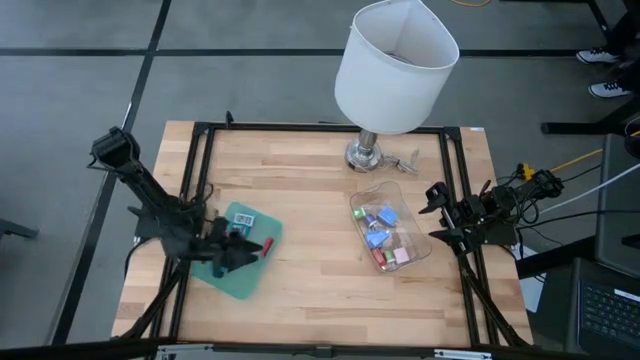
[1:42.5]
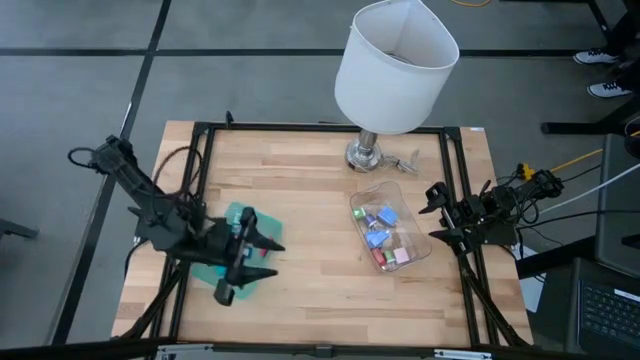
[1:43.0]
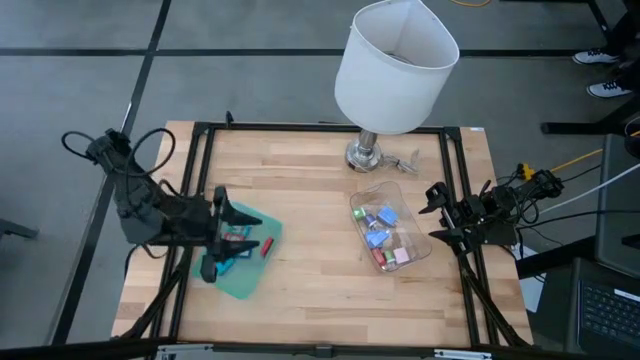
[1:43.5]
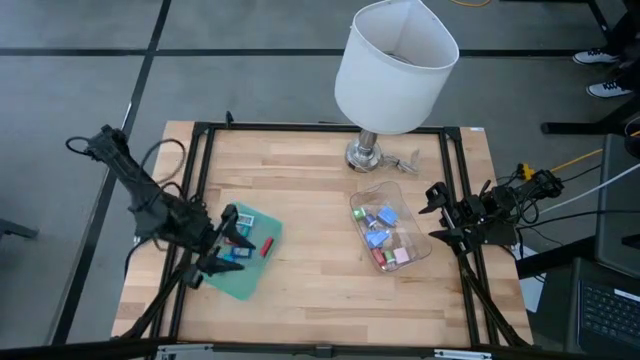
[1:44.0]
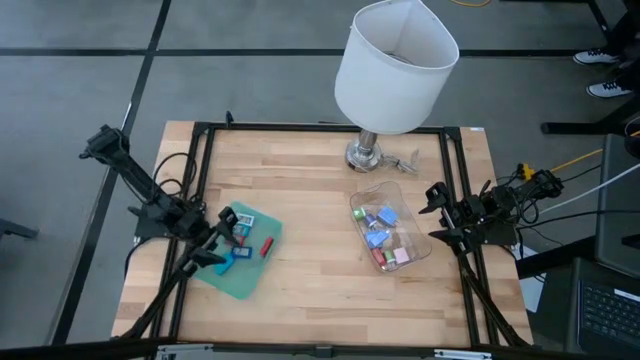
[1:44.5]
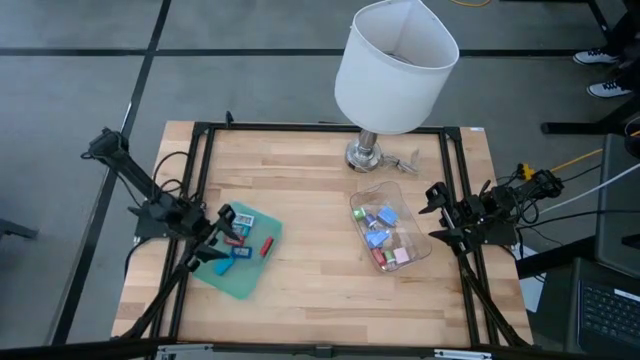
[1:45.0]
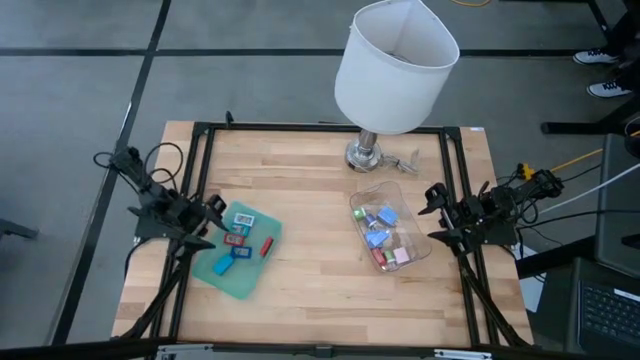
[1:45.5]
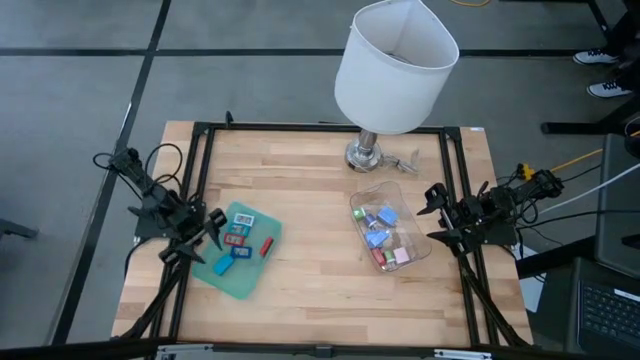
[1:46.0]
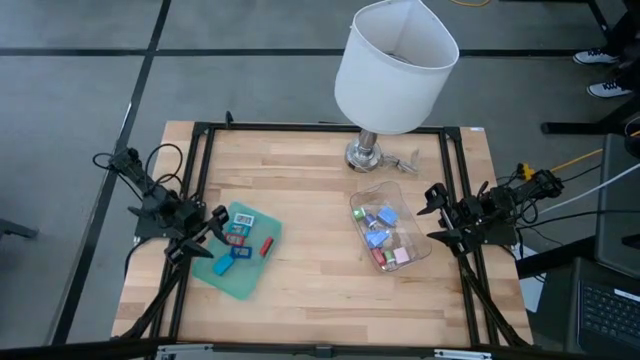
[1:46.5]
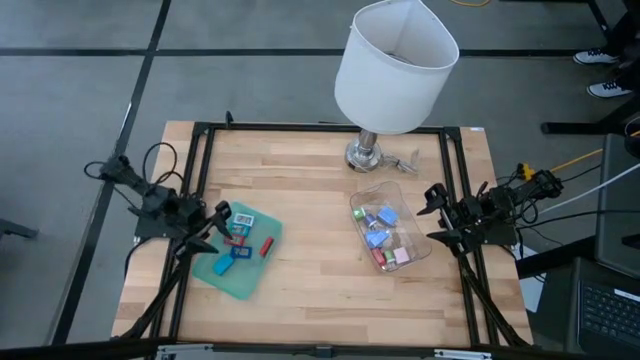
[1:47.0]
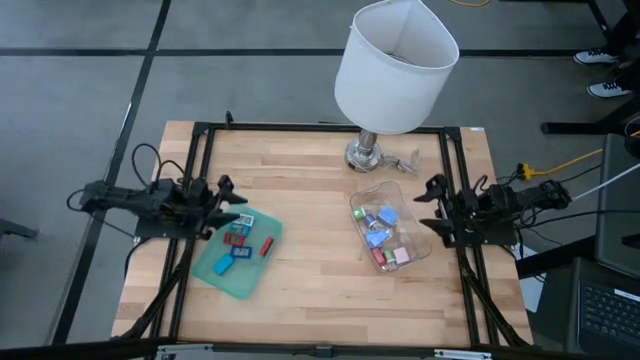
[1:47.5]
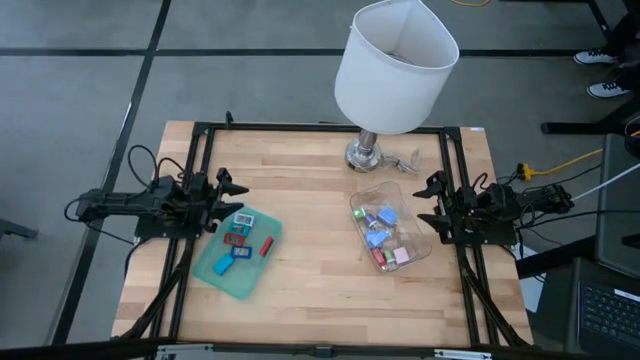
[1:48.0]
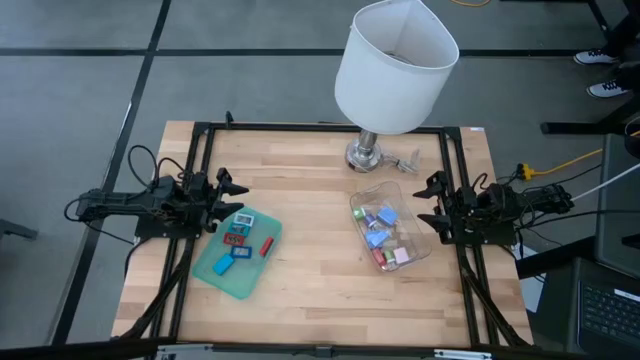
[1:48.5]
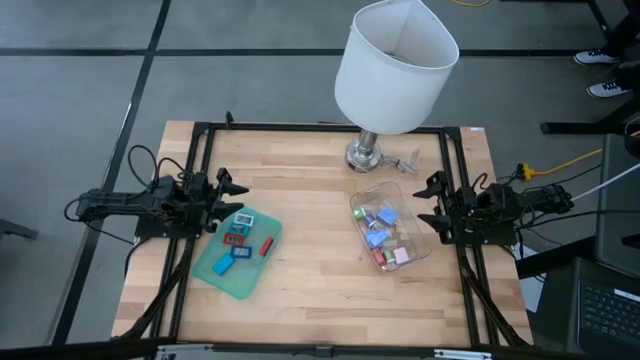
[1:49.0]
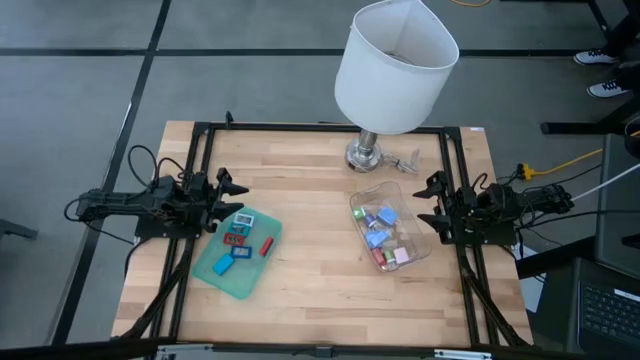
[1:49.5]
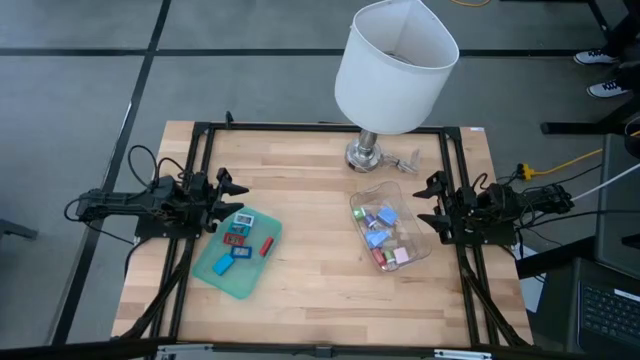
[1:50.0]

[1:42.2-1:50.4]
Task: Pick & Place Office items
Return to Home Position

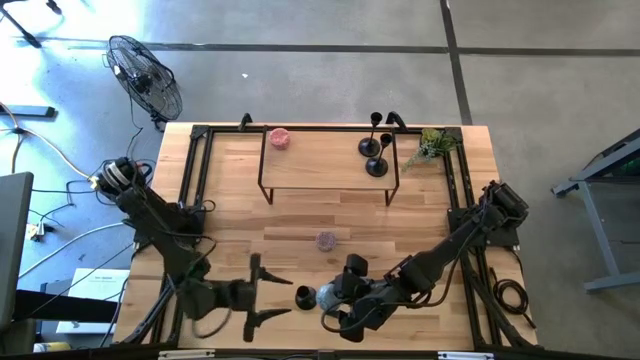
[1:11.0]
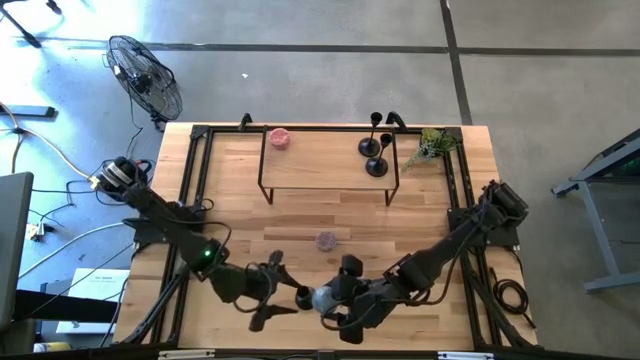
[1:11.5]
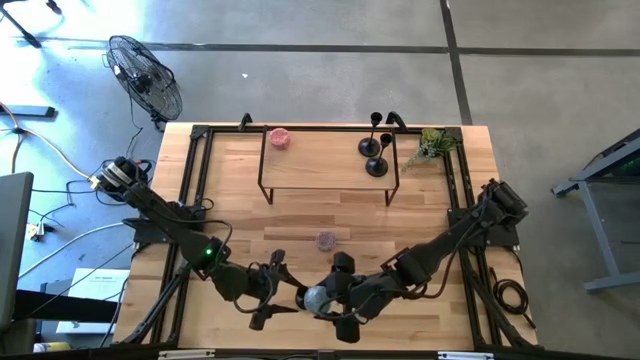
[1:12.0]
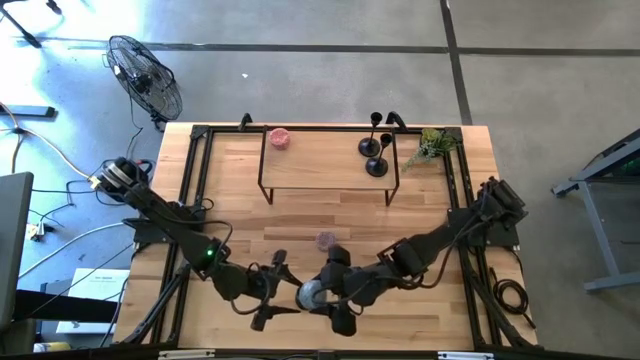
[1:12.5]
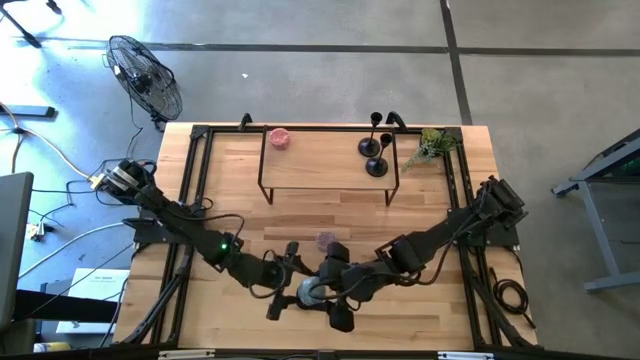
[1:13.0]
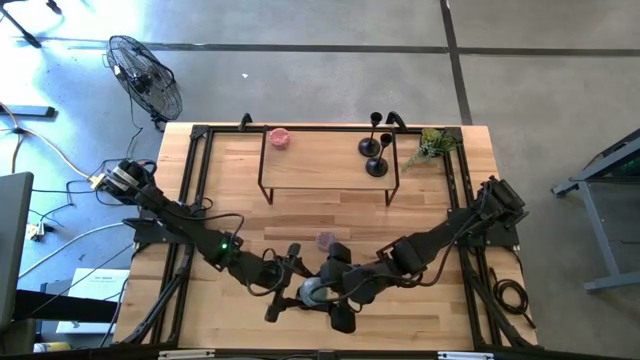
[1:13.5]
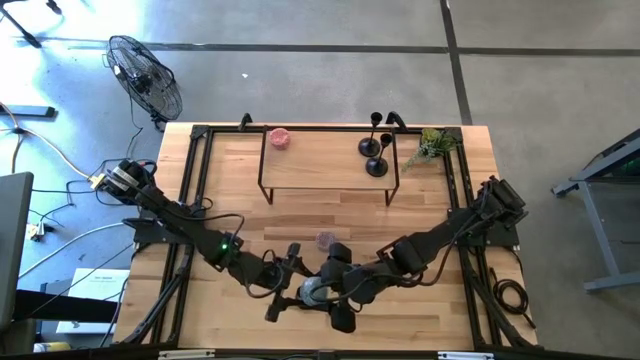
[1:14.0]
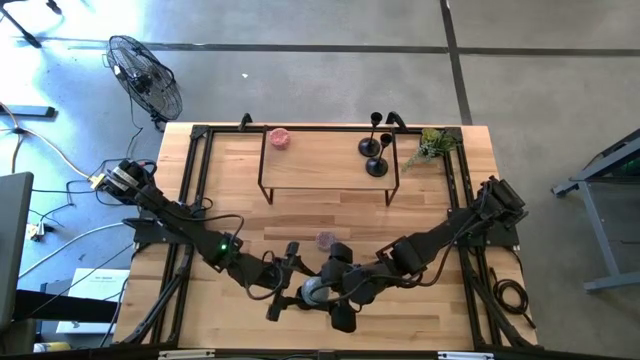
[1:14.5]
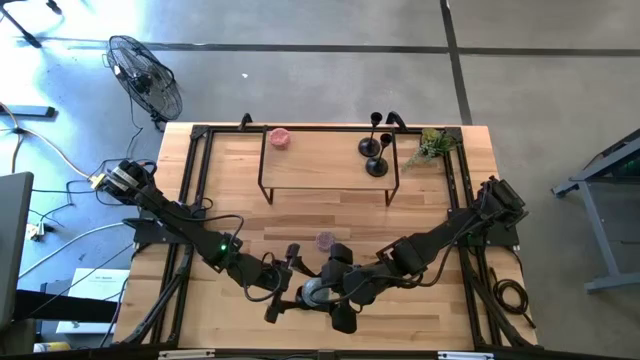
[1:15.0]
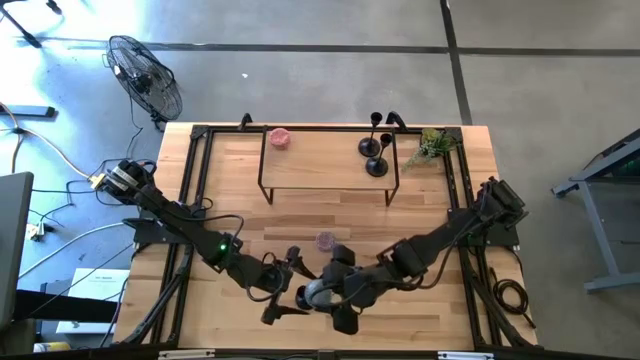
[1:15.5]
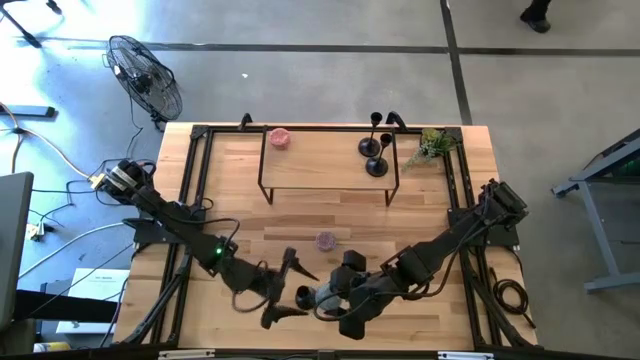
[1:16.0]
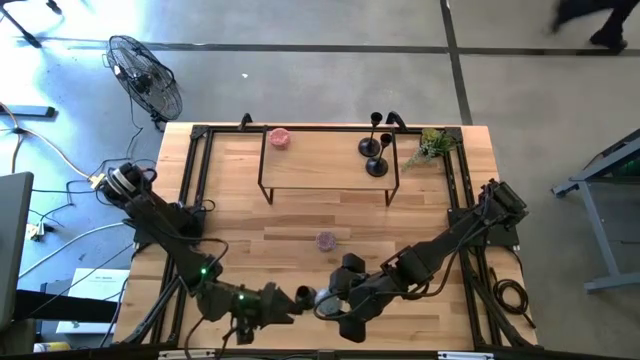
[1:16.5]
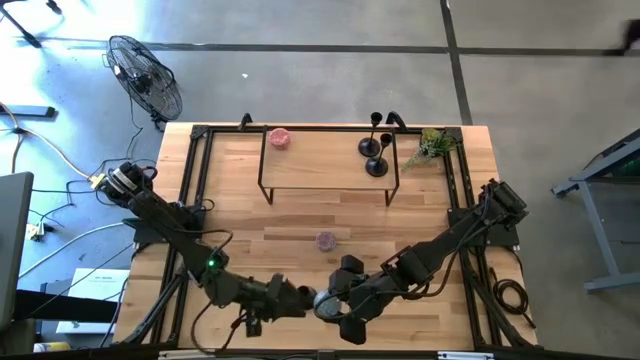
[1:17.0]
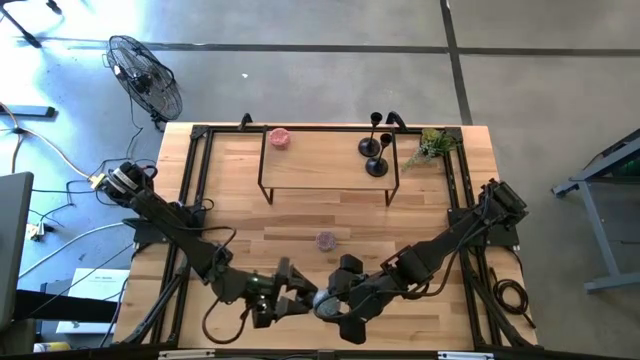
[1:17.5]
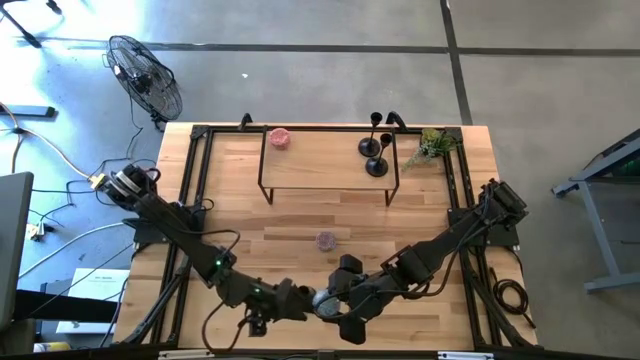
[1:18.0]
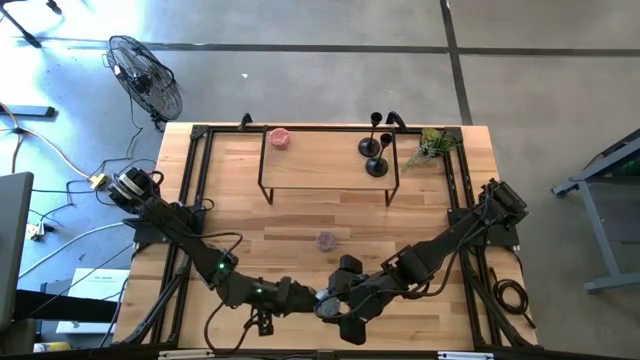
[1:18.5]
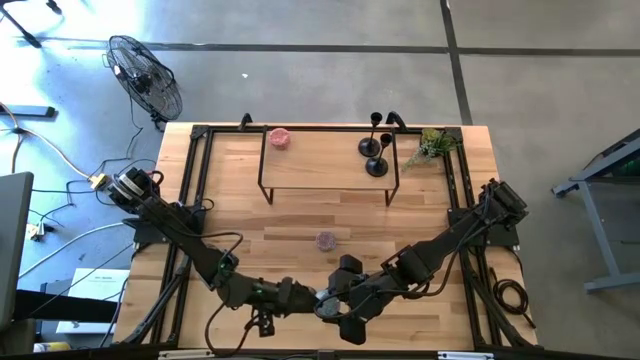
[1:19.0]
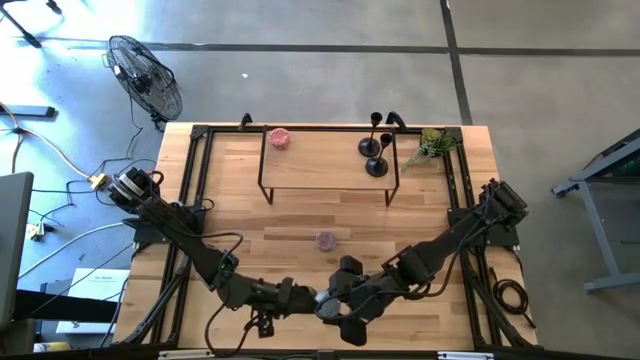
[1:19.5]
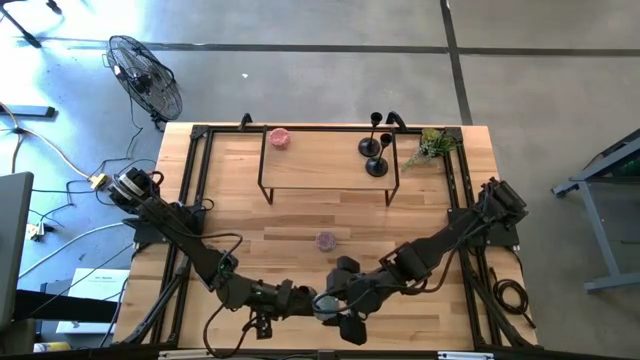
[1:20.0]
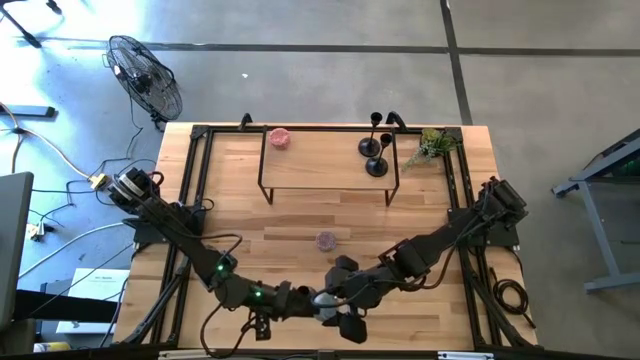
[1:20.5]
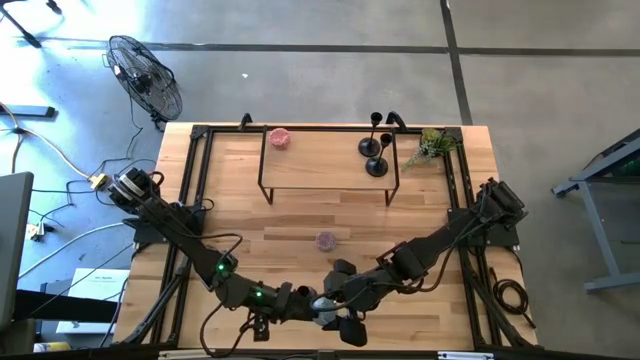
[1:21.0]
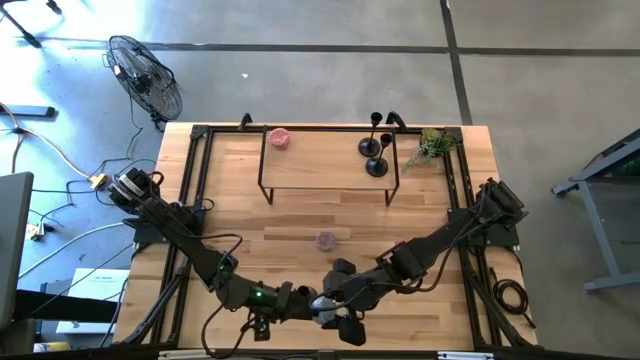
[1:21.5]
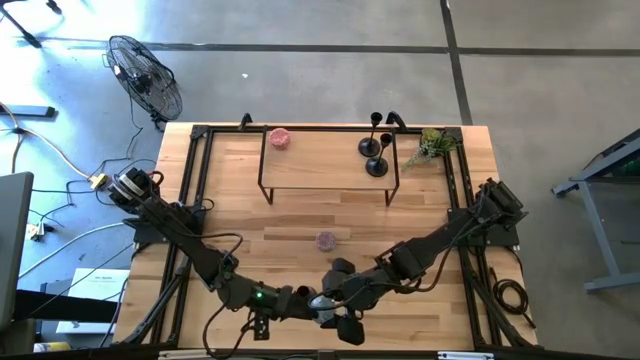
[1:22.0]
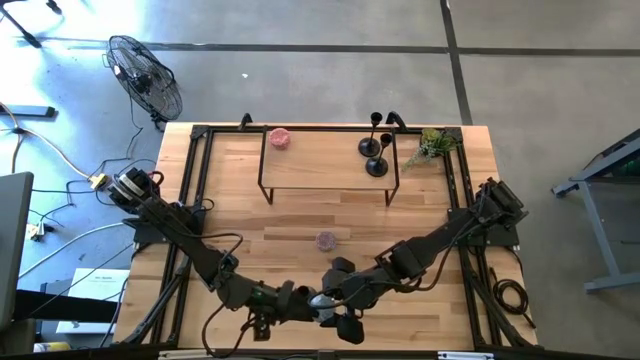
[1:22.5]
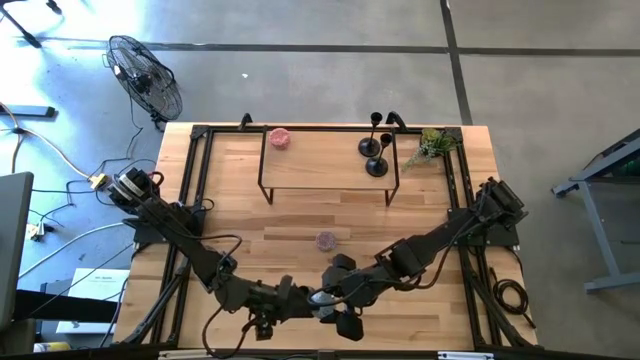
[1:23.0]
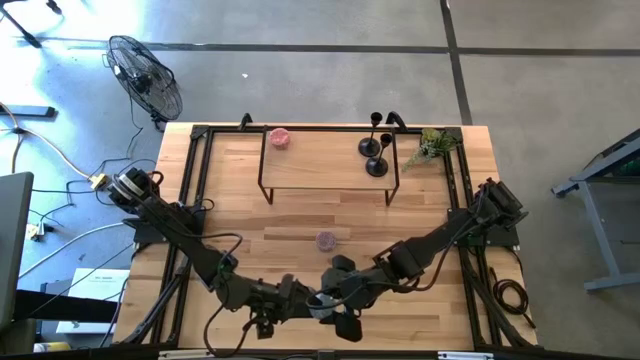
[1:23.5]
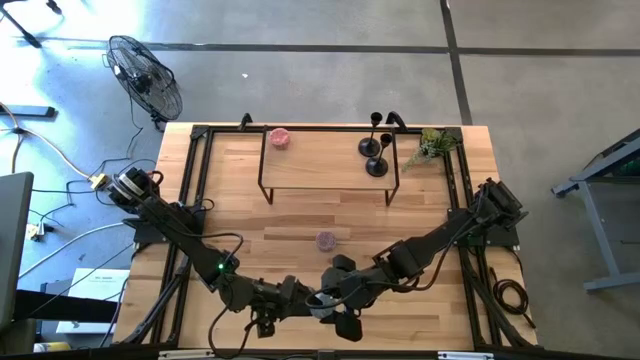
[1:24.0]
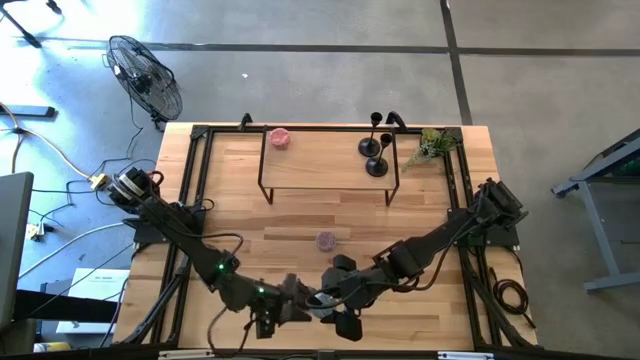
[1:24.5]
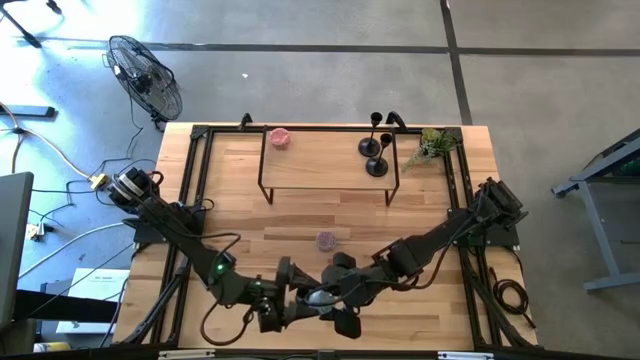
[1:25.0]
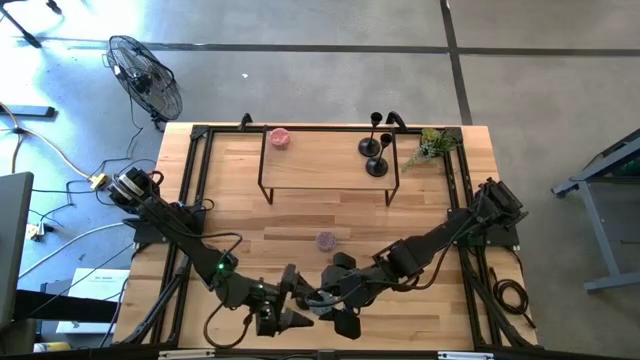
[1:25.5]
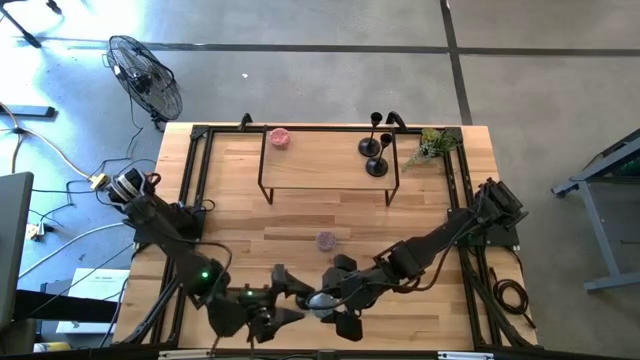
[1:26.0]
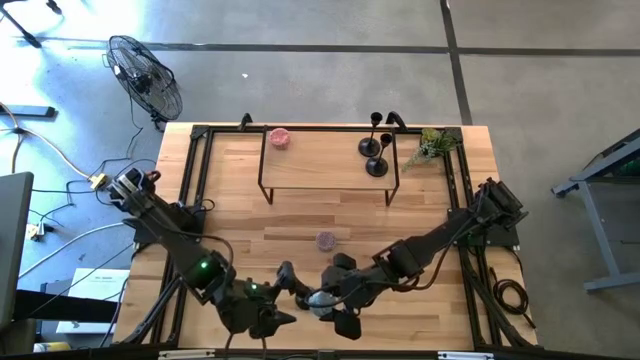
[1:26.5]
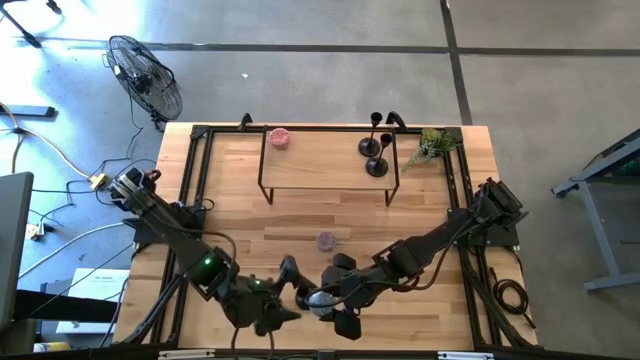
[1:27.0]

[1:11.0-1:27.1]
Task: Pick & Place candle stick holders
Put the blue patterned scented candle on the shelf
